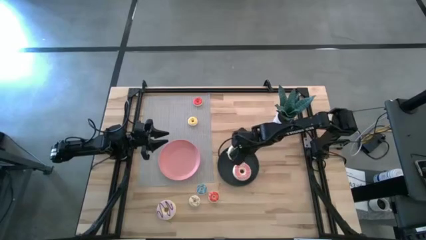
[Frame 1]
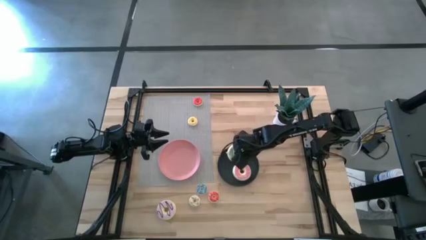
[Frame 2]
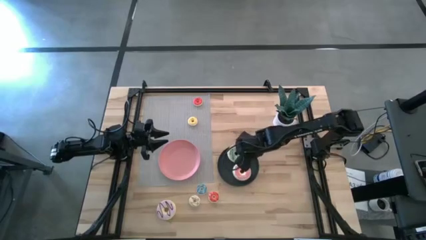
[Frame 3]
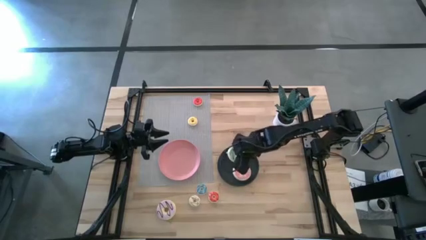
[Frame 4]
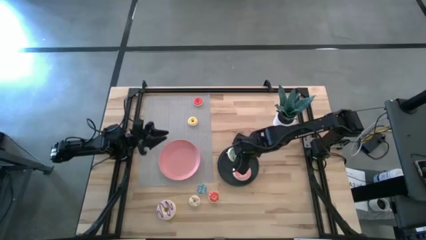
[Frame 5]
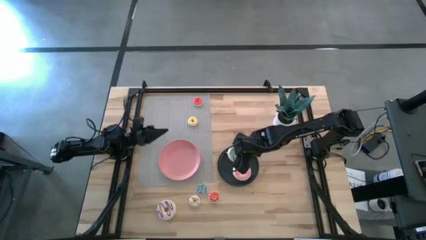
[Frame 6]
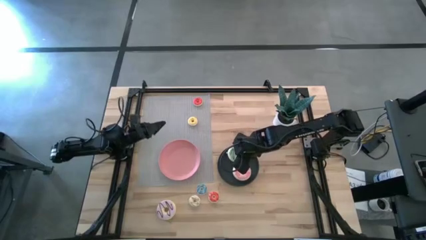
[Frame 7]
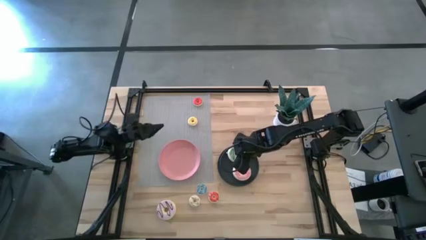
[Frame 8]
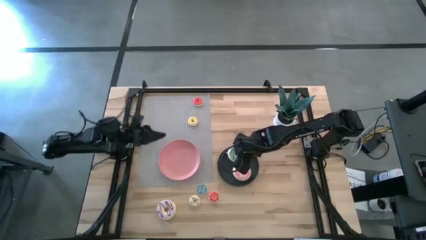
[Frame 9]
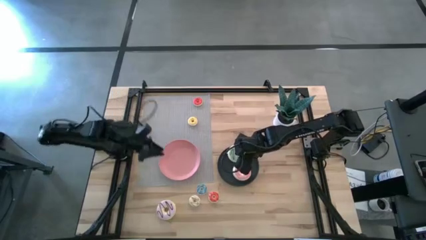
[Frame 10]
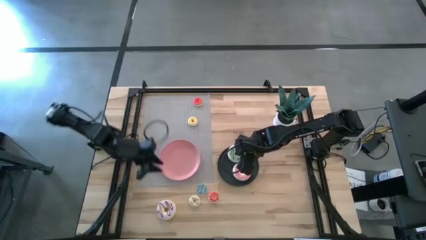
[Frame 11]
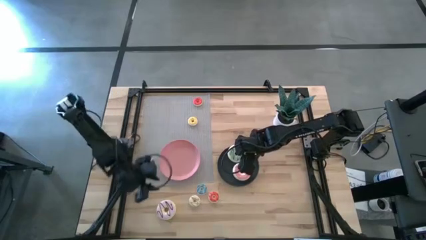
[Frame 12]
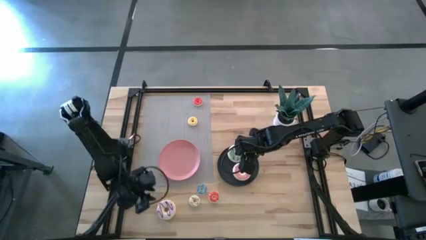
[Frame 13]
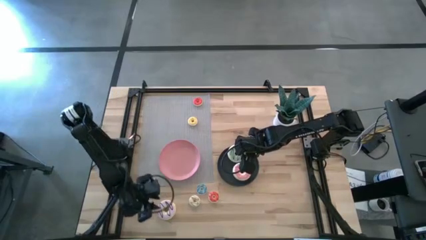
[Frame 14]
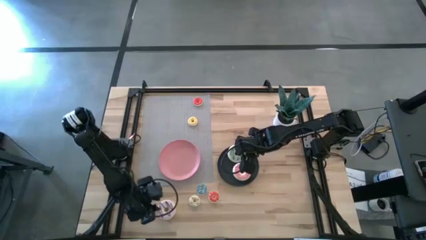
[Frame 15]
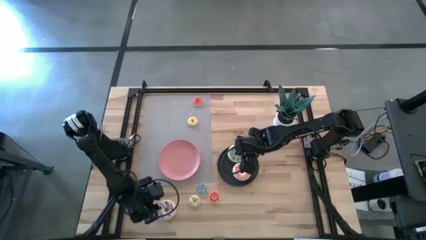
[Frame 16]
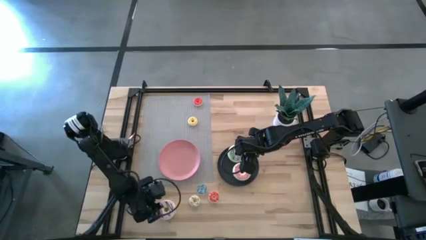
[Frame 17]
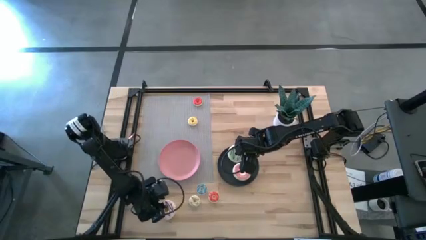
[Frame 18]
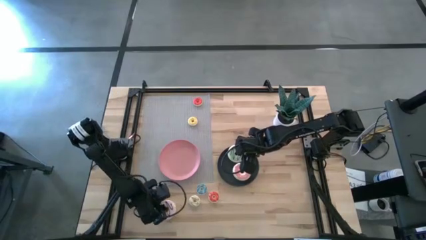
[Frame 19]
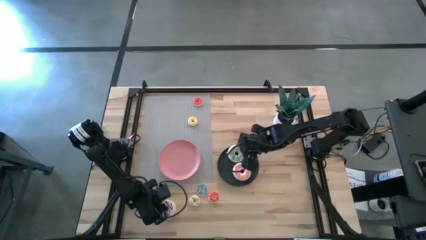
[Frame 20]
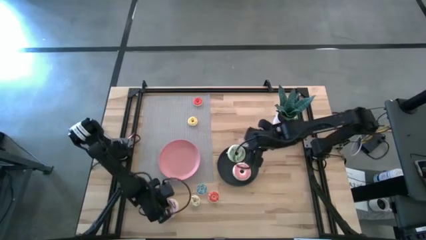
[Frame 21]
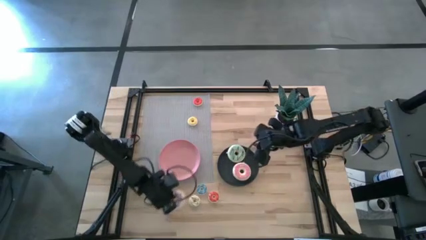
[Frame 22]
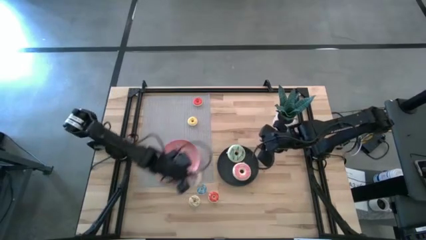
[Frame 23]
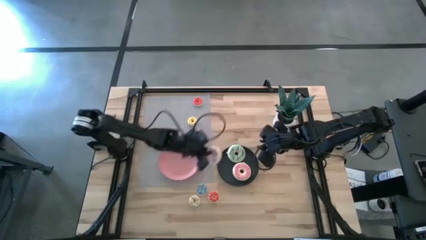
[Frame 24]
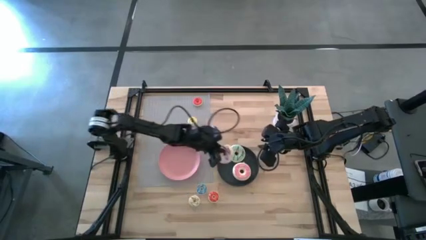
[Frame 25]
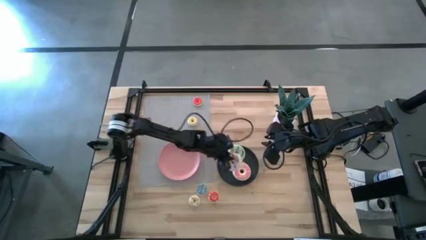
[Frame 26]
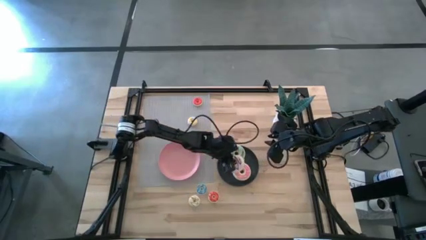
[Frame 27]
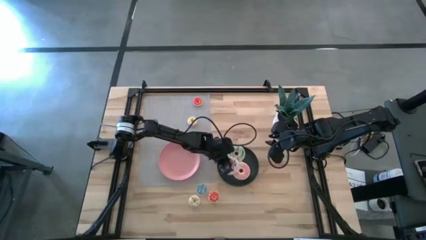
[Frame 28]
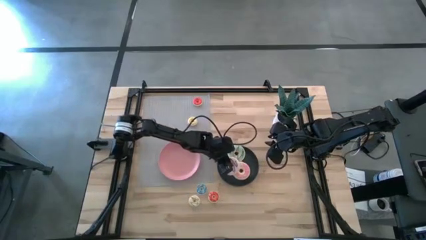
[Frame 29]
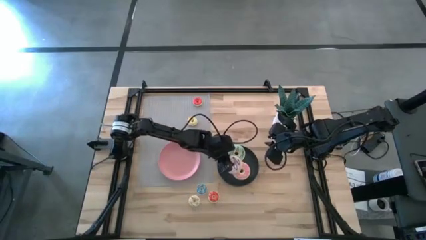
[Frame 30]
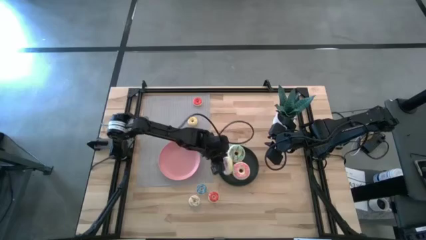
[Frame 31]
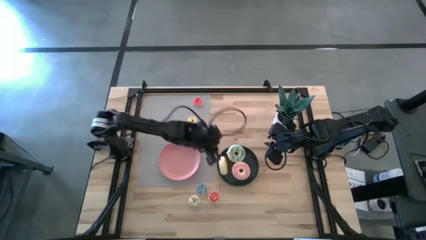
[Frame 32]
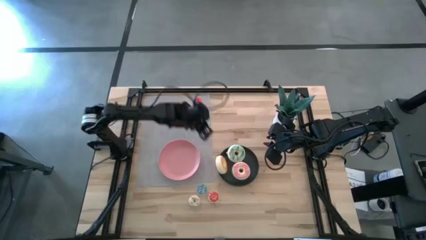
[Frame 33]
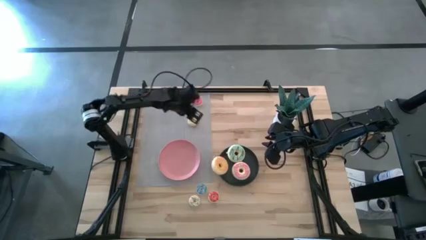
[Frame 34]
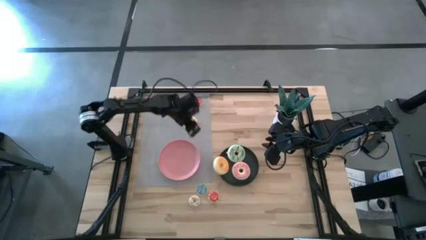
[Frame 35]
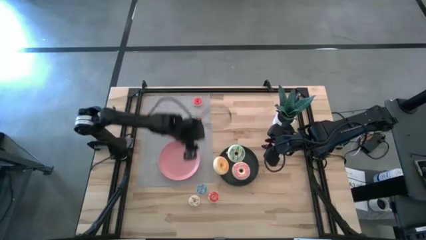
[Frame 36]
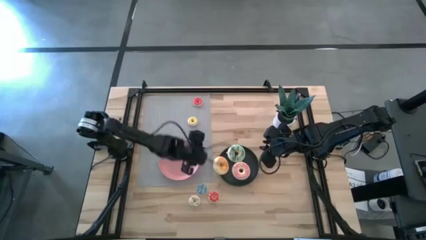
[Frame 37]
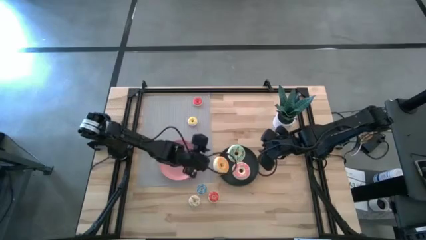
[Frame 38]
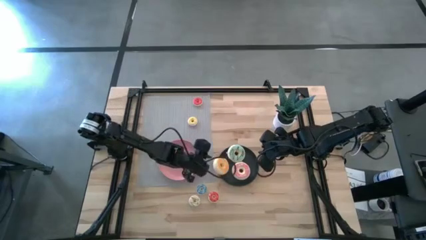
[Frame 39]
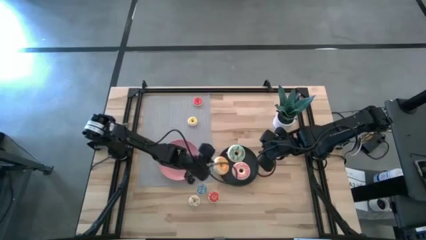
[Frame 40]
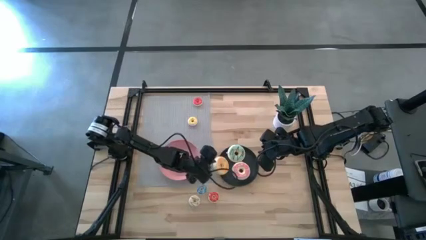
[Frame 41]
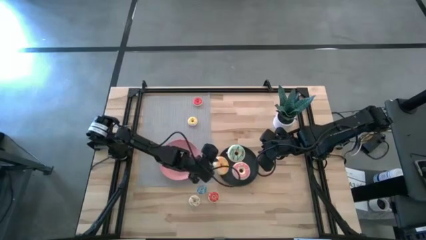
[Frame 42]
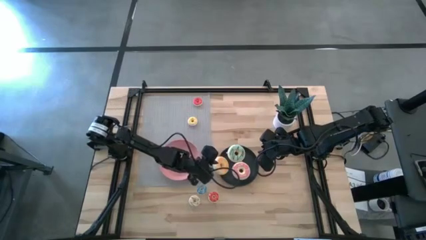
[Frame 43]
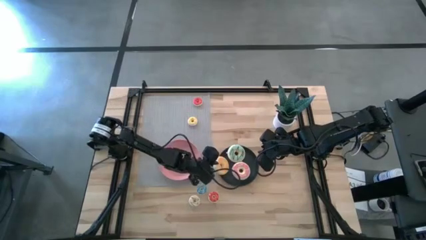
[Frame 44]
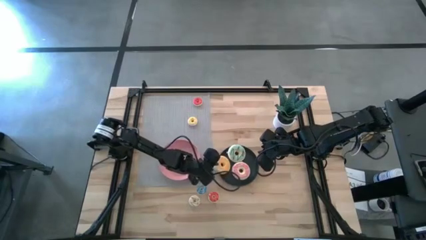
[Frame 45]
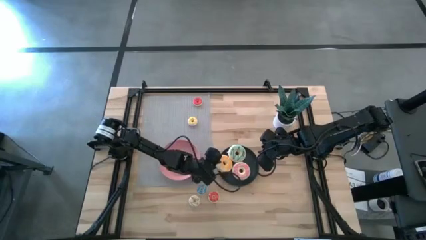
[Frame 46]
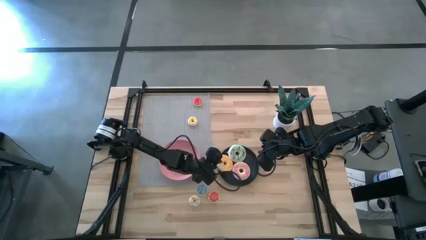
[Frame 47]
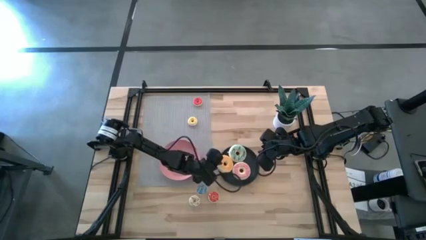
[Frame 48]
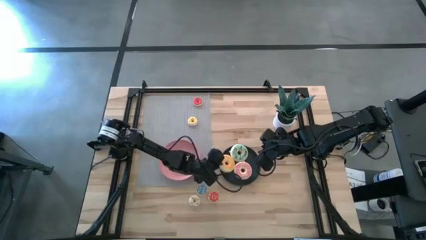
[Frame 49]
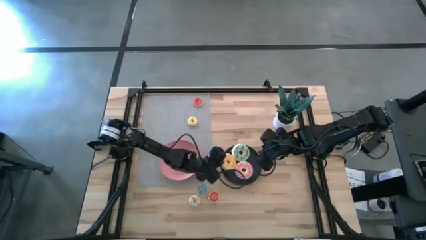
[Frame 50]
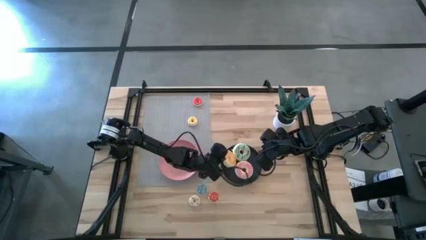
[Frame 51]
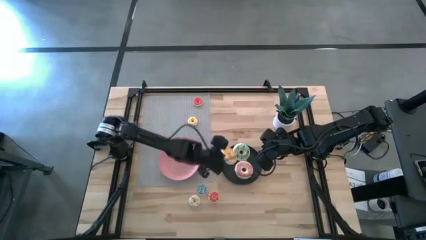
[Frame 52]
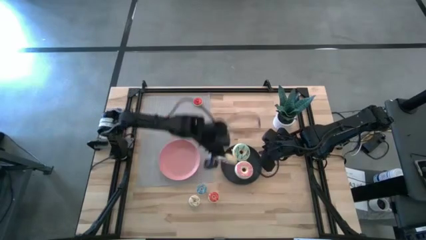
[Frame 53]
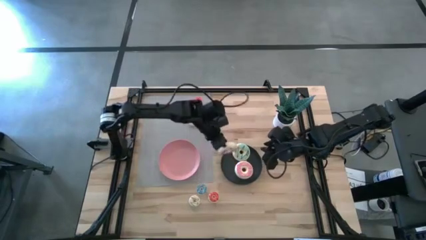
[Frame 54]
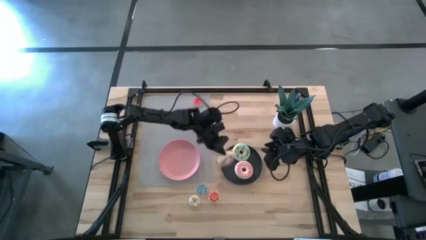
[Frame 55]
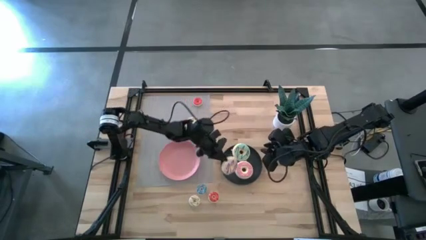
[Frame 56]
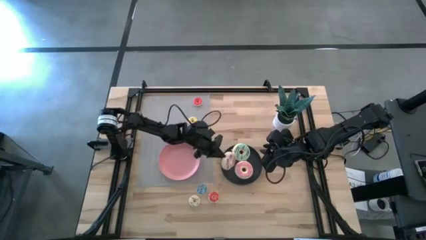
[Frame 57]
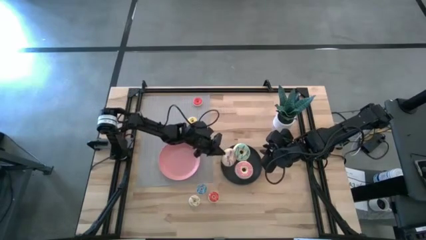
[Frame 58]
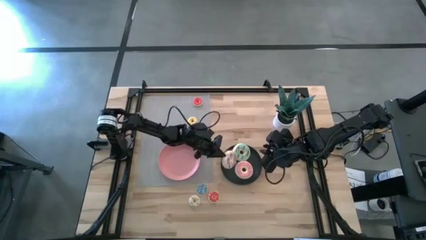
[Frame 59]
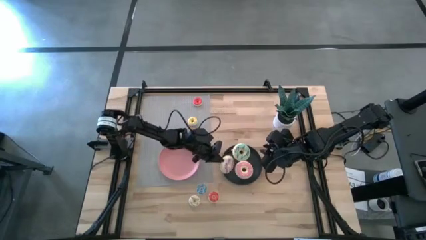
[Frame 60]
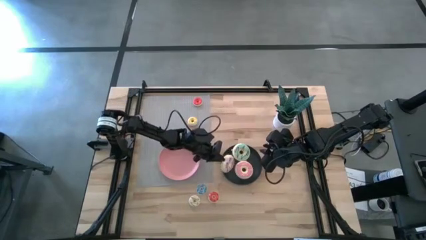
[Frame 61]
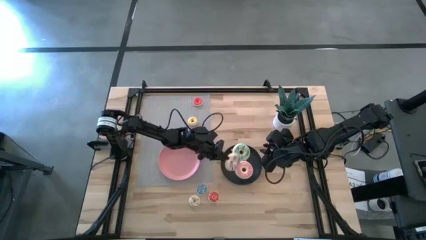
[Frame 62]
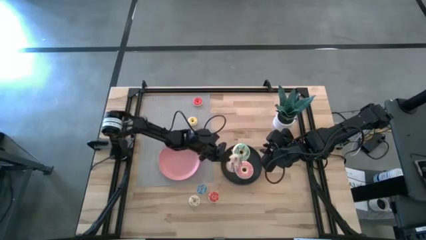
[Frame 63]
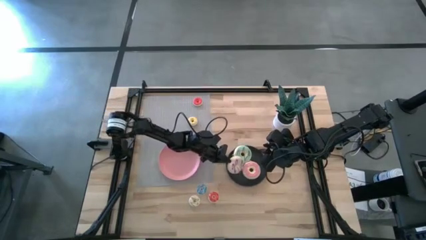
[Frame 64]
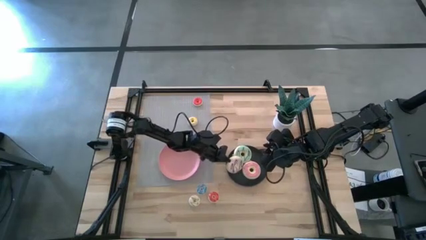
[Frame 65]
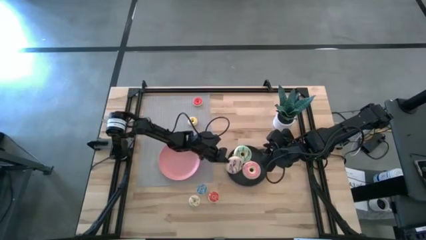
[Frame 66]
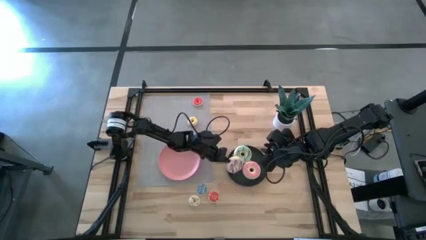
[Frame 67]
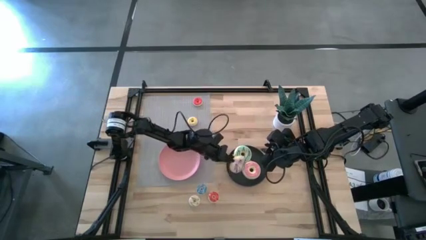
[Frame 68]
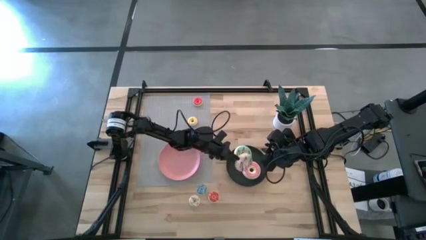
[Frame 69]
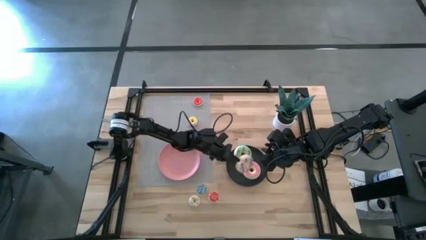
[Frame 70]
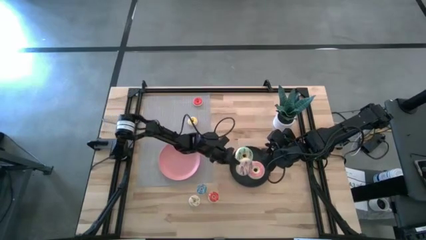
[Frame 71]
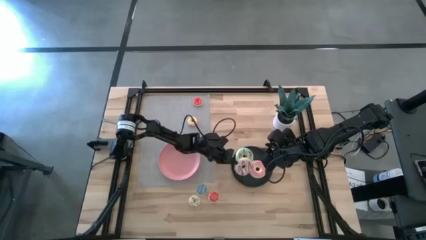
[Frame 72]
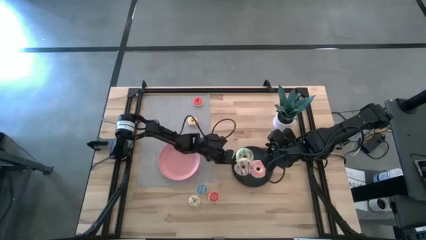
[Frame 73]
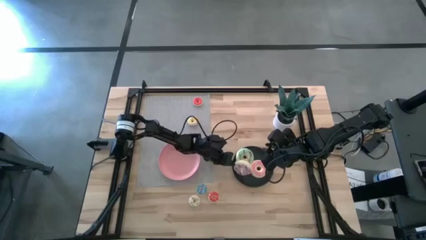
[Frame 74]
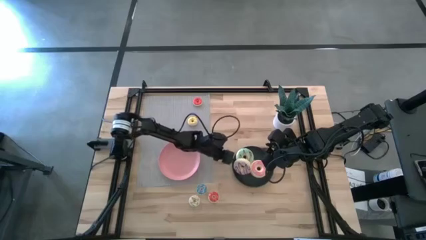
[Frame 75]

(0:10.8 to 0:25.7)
Task: Pick & Place donuts
Put the small violet donut on the pink plate
